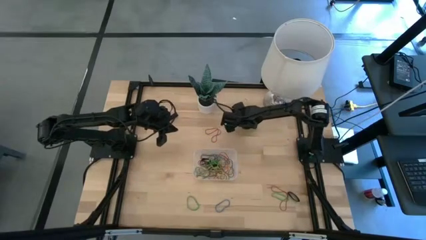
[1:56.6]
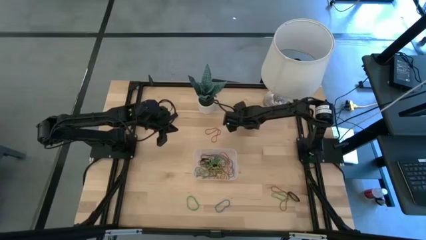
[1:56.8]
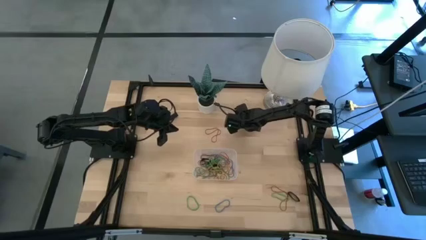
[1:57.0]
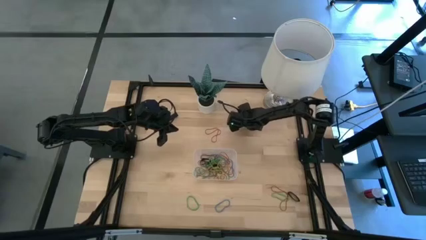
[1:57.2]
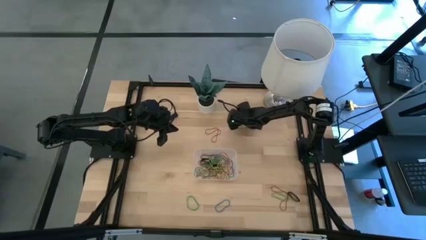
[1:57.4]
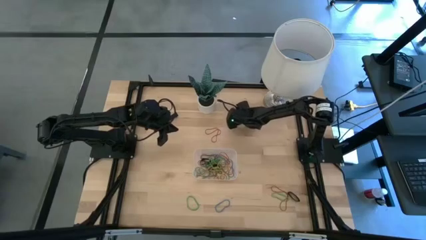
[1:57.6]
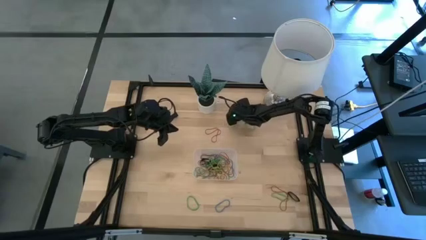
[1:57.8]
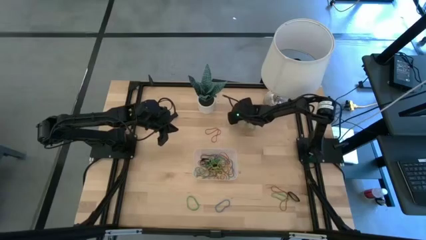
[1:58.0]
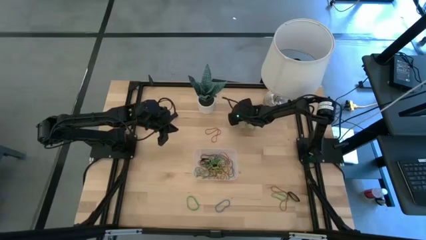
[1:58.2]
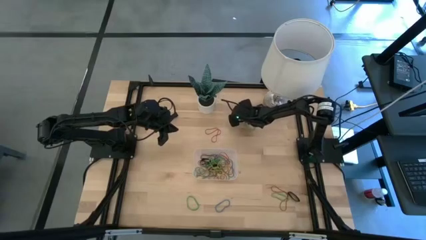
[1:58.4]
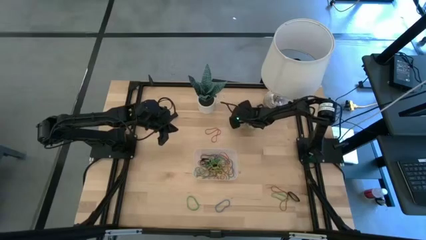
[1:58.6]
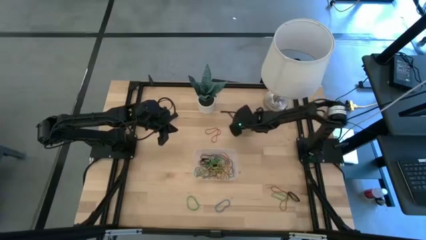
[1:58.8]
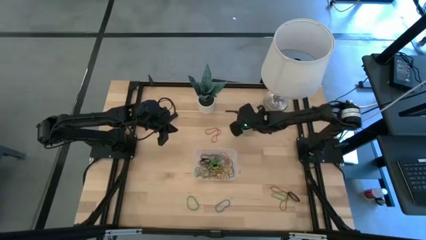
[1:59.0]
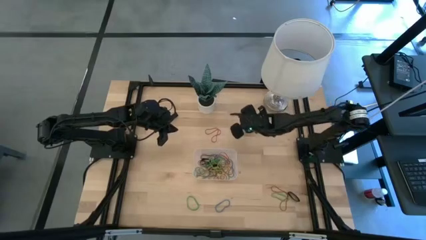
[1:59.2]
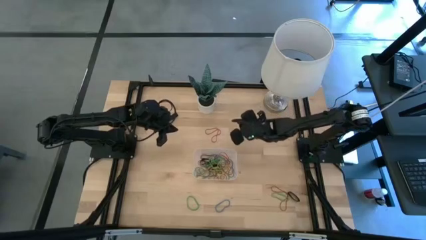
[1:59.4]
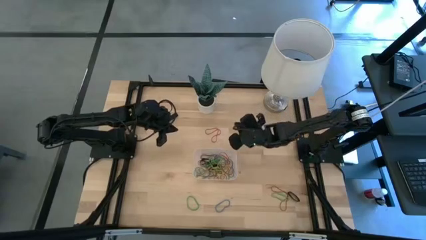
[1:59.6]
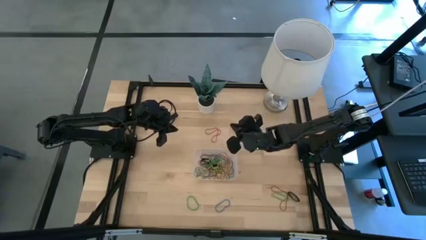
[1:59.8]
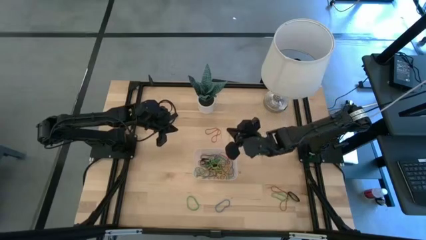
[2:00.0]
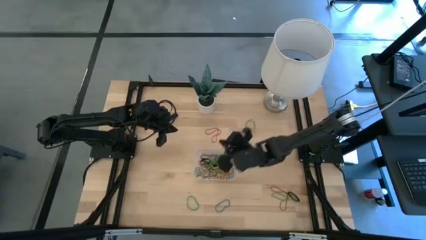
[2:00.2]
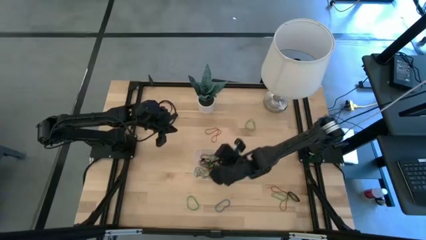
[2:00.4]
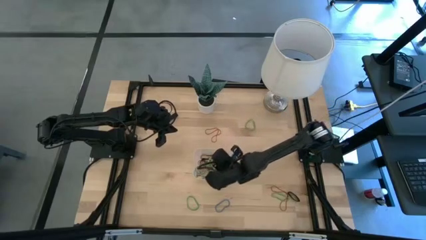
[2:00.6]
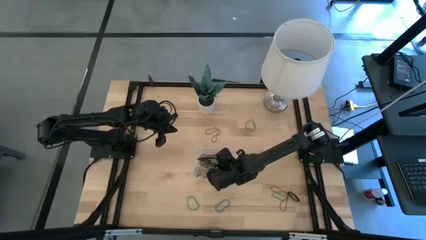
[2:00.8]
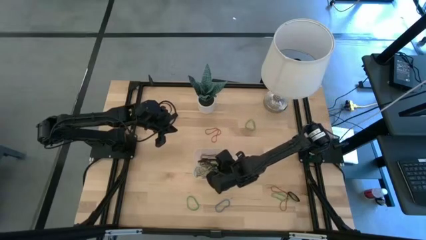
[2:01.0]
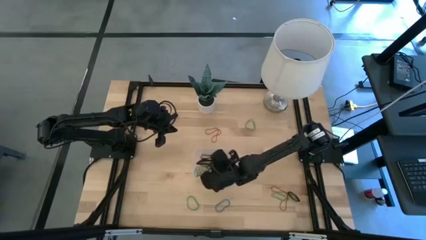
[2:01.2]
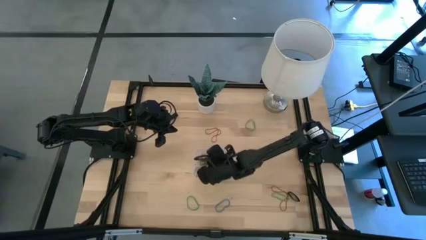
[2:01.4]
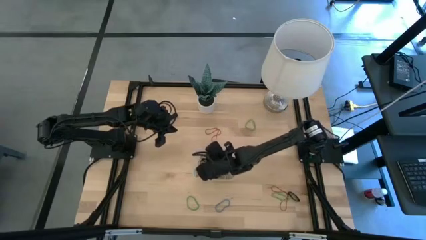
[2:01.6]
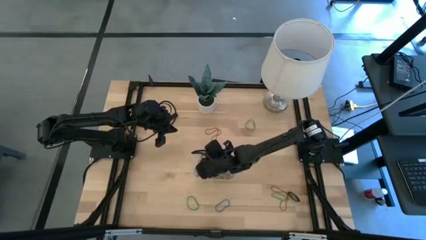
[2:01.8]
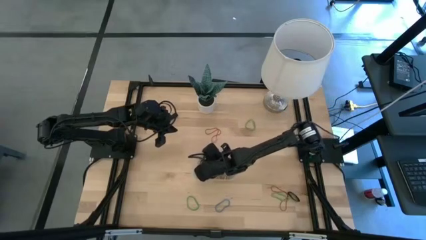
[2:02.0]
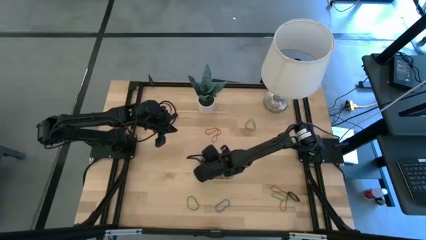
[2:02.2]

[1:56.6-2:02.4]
Task: Pick and place rubber bands into bin
Put the yellow rubber band into the transparent bin

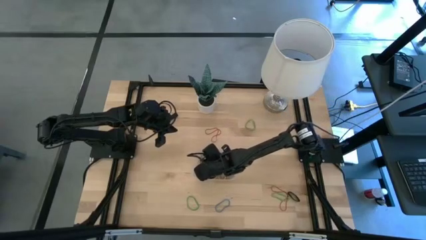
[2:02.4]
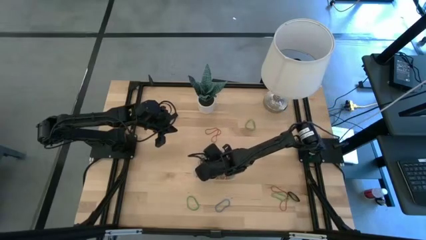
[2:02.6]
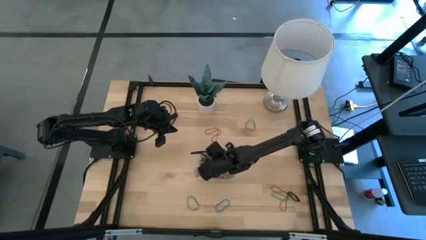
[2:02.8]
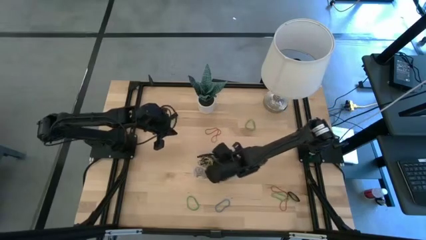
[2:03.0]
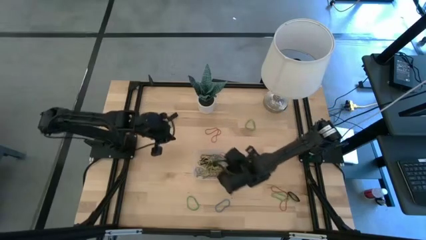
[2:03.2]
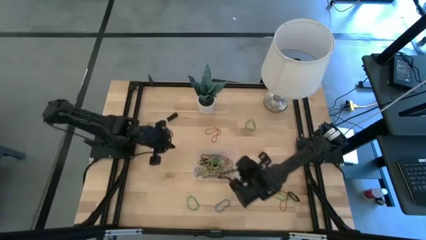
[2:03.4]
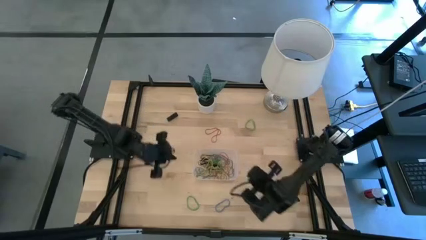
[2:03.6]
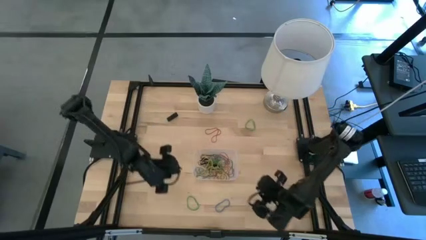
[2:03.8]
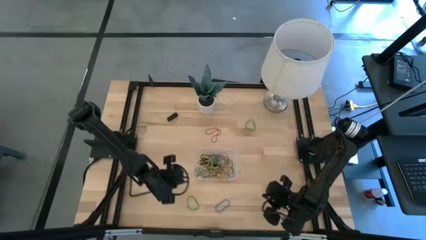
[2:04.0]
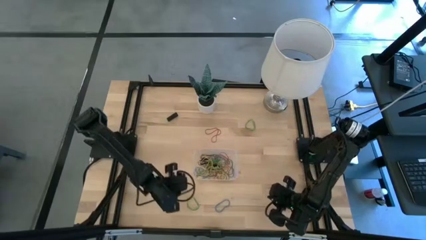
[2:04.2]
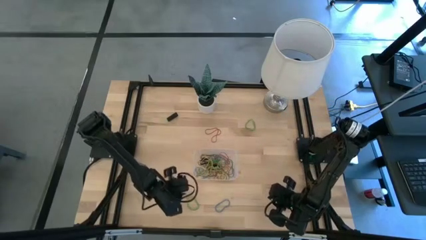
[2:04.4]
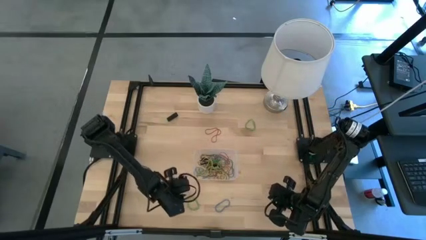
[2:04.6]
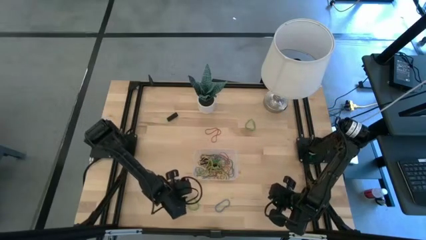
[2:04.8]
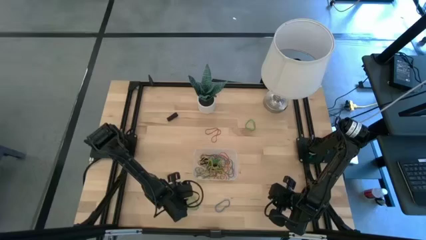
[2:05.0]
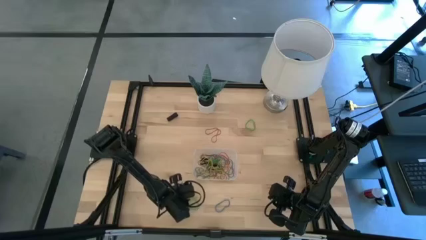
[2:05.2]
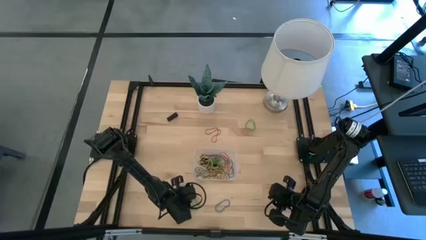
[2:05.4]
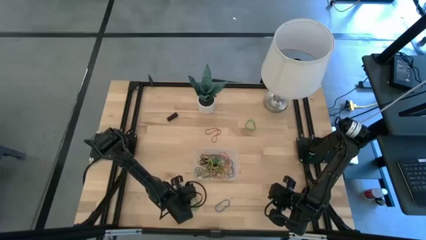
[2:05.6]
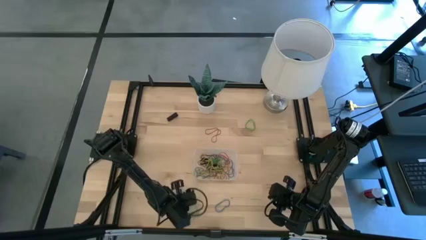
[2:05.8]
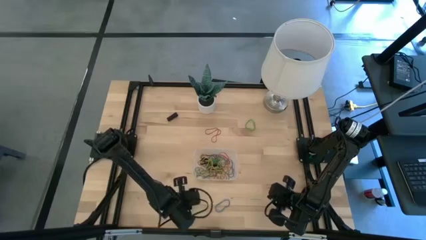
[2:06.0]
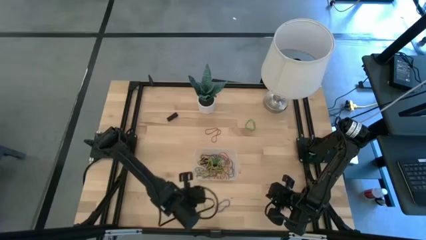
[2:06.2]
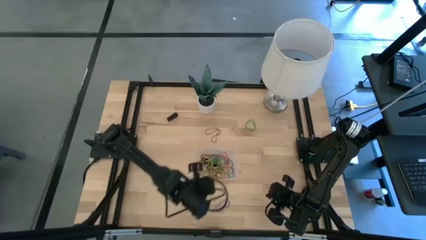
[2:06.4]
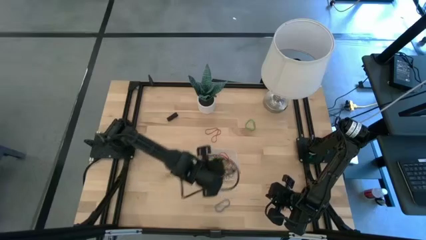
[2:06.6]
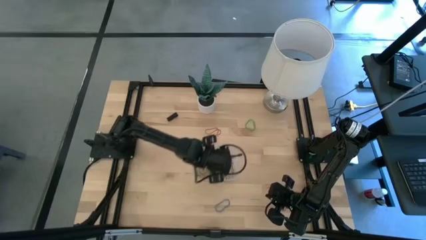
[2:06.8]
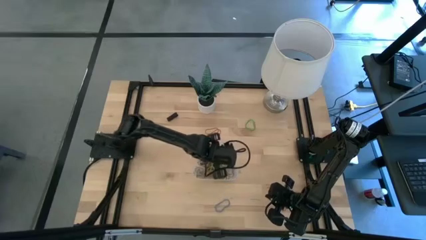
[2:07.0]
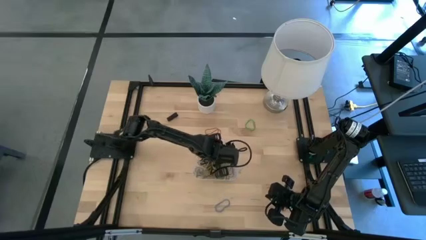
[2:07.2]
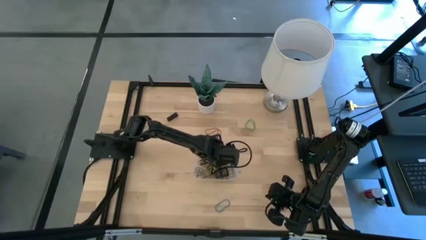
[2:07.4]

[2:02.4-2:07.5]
Put the bottom left green rubber band into the transparent bin

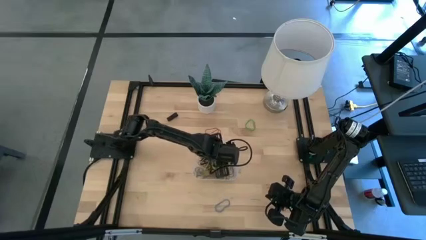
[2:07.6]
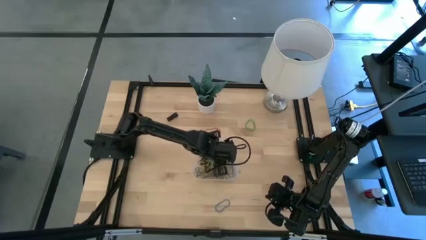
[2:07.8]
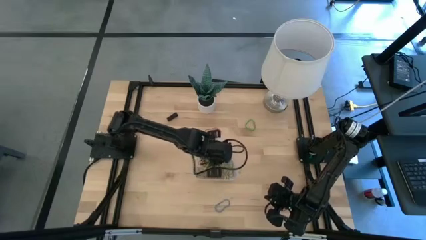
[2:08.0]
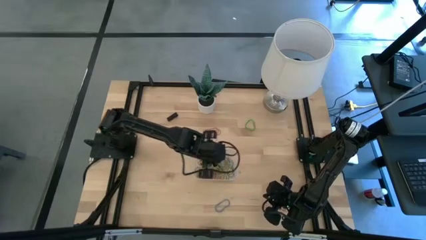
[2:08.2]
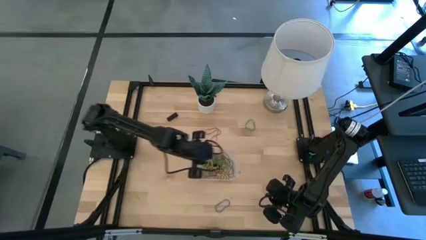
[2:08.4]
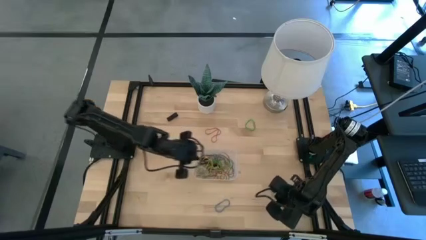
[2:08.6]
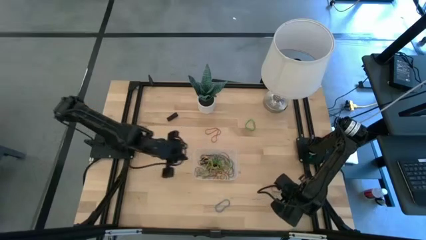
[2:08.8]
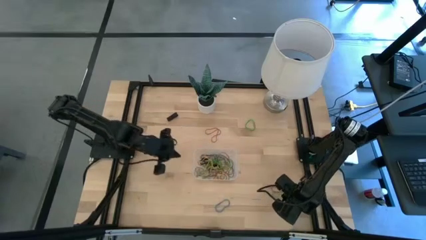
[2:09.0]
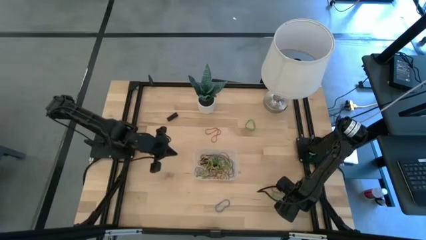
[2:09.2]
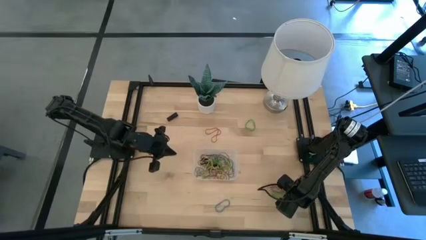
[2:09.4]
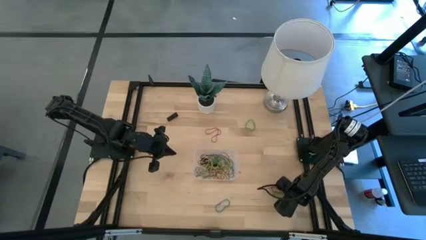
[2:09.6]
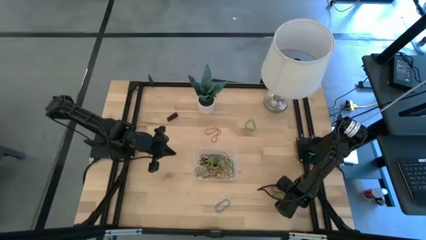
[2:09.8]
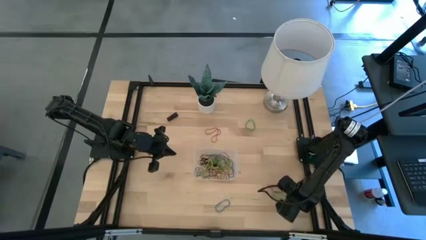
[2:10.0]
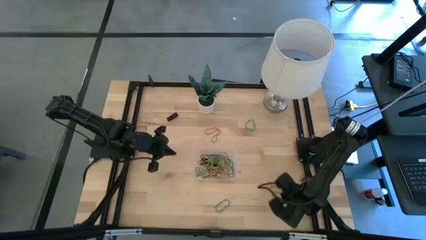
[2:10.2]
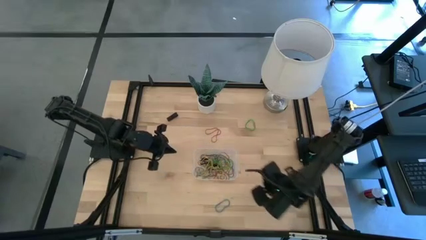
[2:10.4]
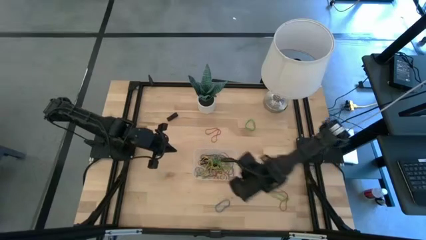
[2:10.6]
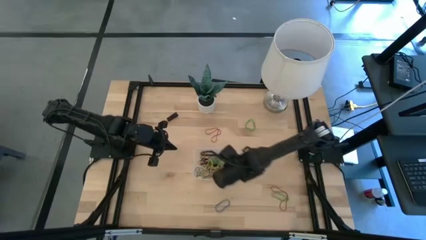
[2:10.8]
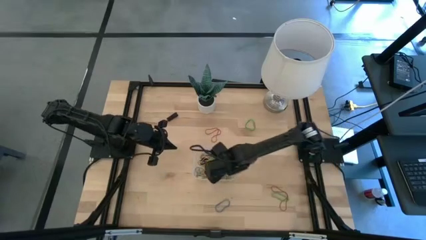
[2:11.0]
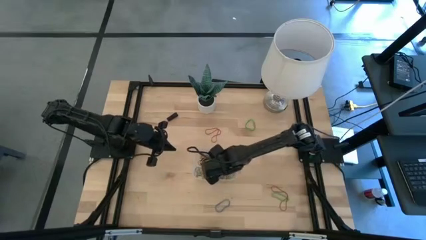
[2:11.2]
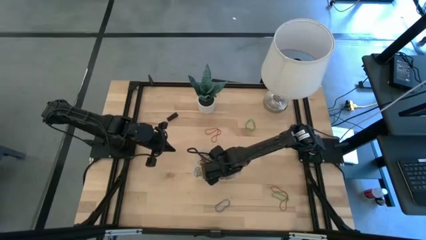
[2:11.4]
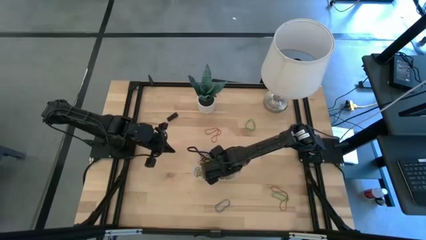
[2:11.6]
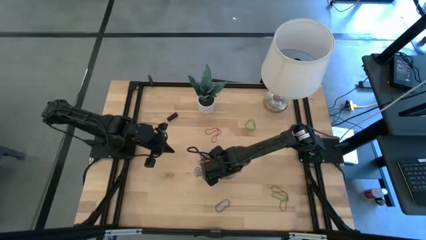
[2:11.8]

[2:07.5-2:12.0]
Put the bottom black rubber band into the transparent bin

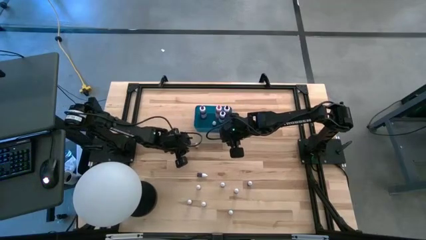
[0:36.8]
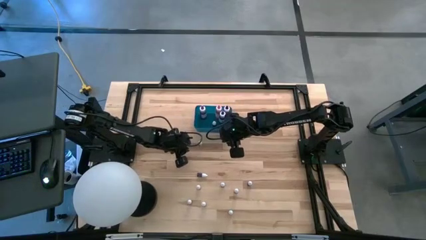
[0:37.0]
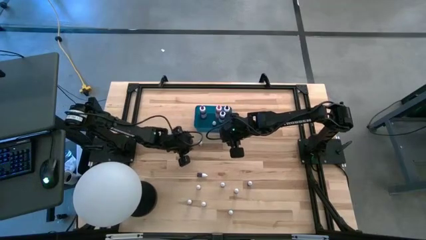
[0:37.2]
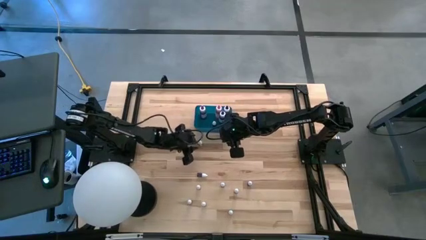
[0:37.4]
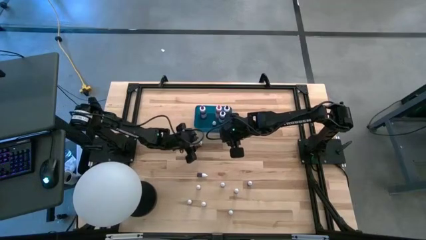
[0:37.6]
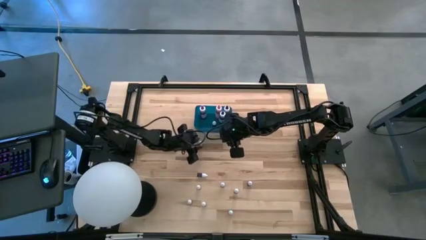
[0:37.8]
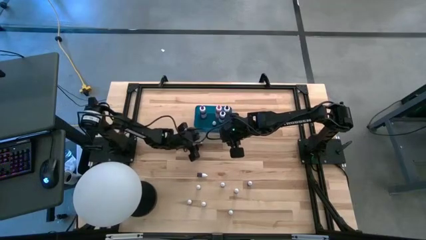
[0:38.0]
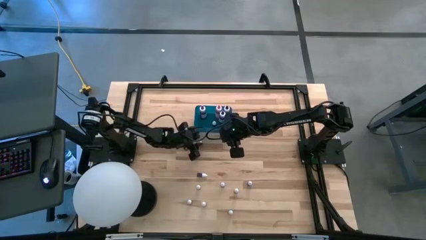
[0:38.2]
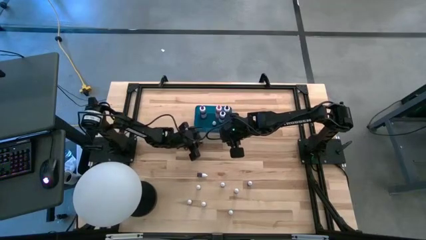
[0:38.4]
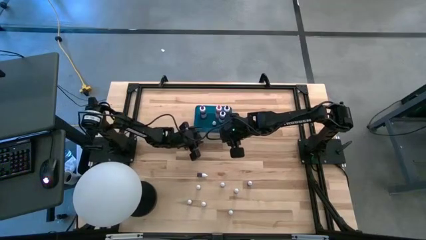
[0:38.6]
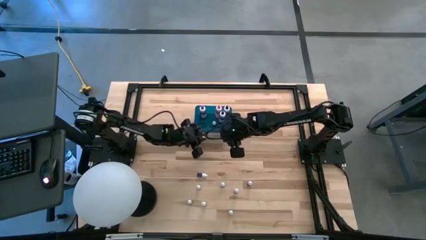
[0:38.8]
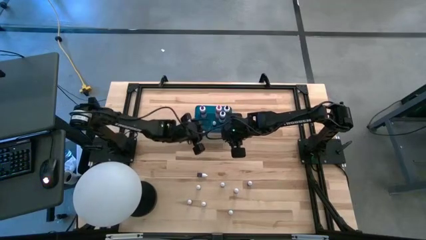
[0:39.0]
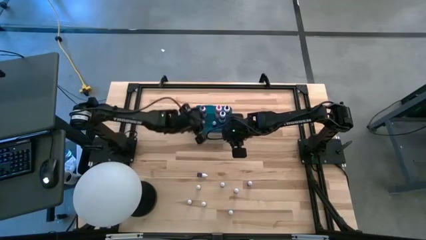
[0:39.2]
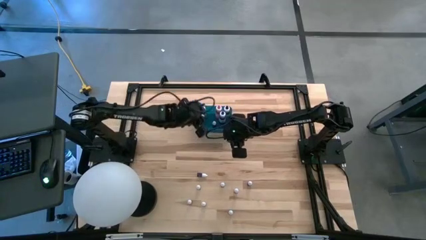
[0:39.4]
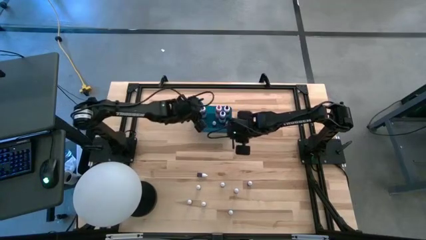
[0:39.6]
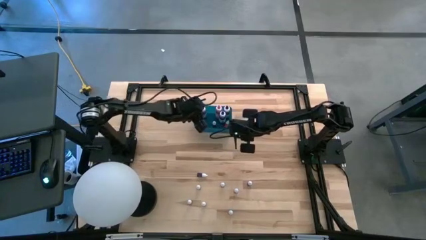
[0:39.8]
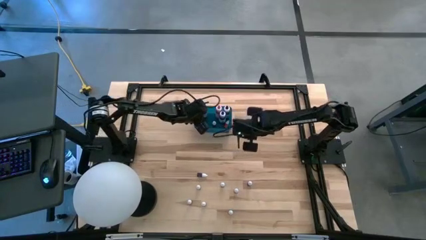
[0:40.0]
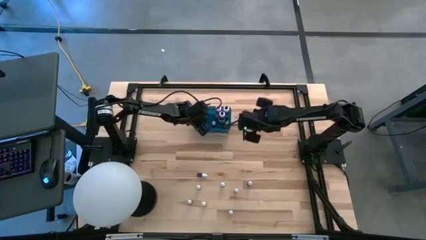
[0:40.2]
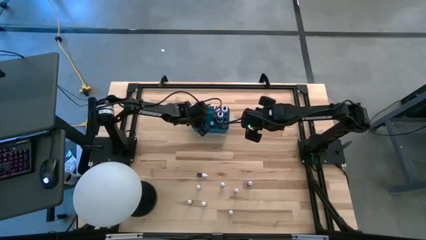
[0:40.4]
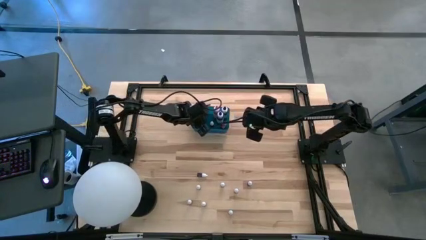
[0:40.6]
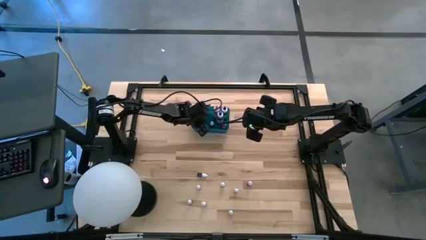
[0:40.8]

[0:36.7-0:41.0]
Task: Pick & Place food coloring
Put the blue food coloring bottle into the blue bin
